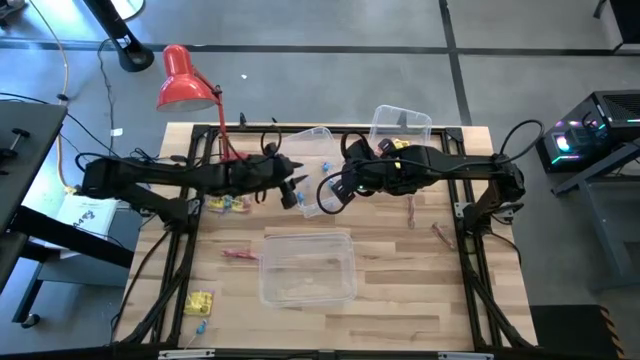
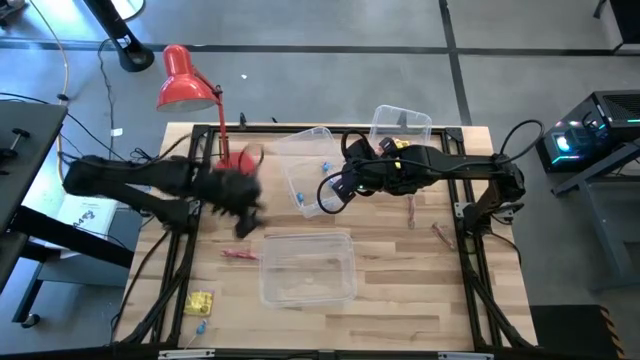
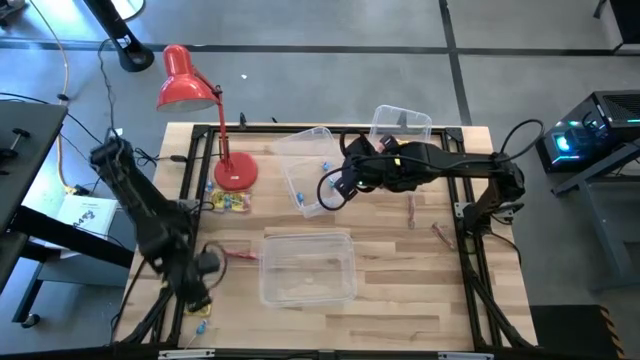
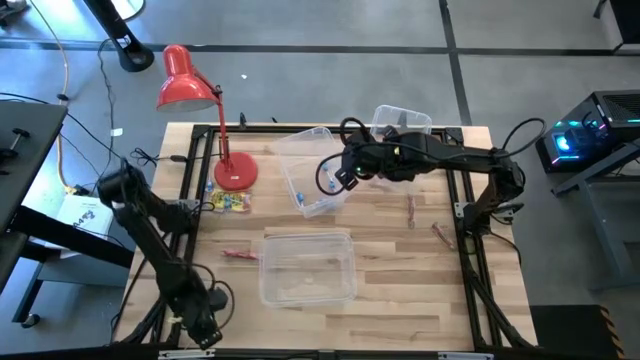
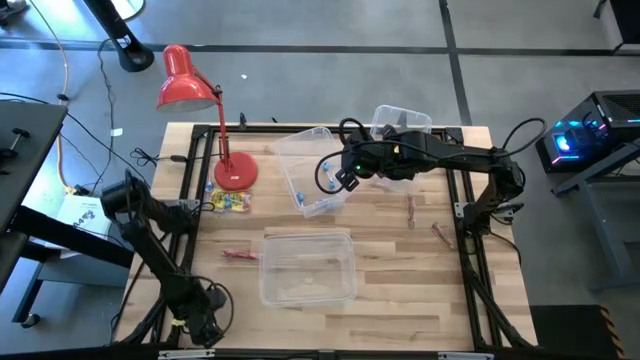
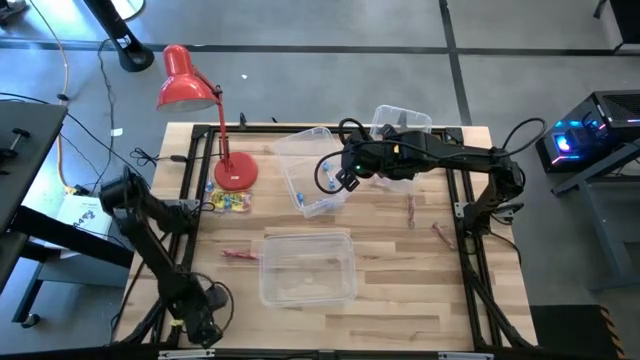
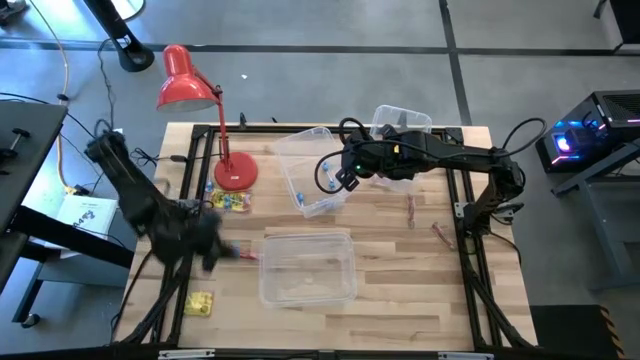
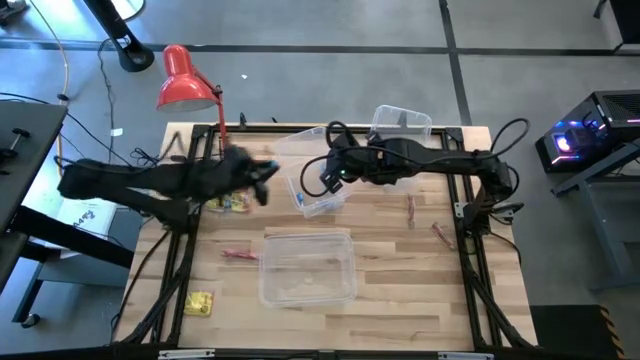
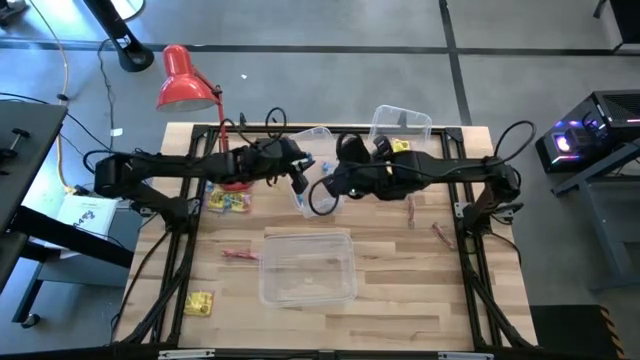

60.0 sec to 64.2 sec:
Task: Sort candy
Put the blue lollipop into the top left transparent bin

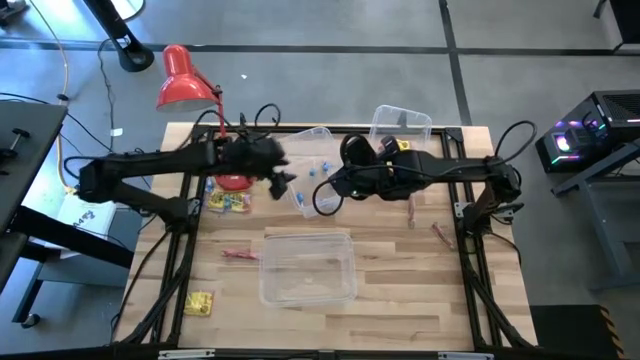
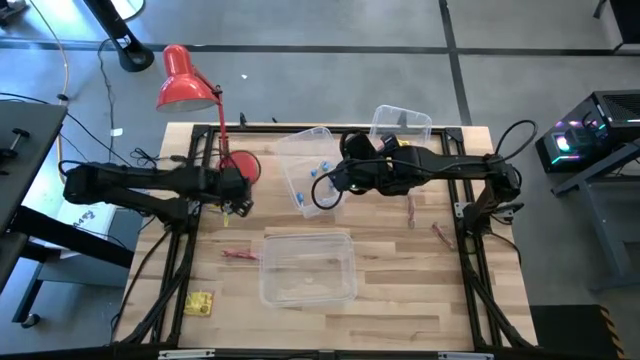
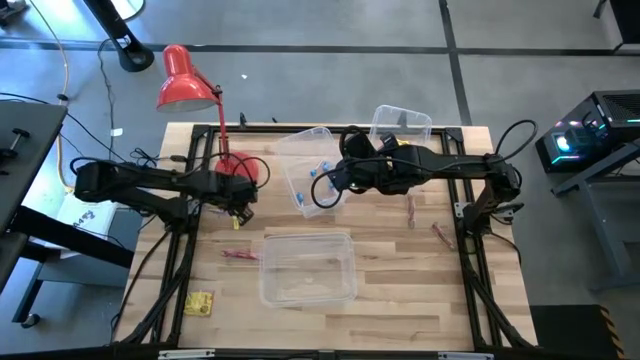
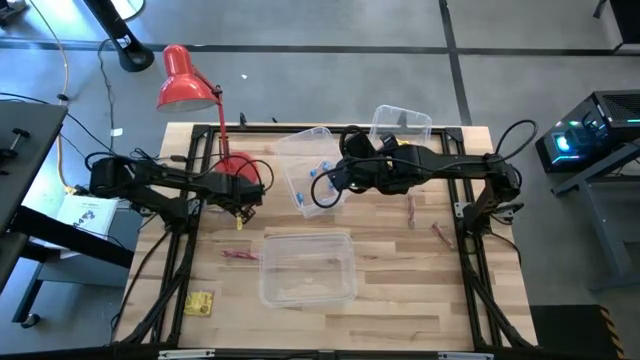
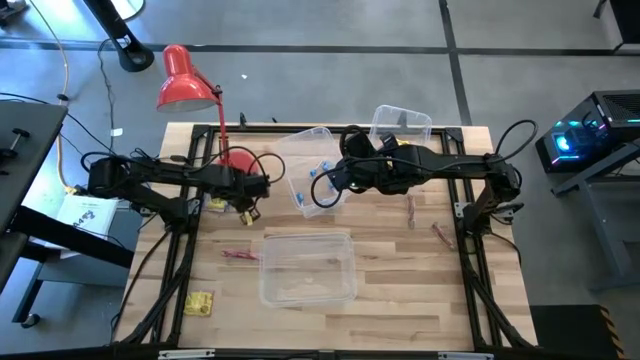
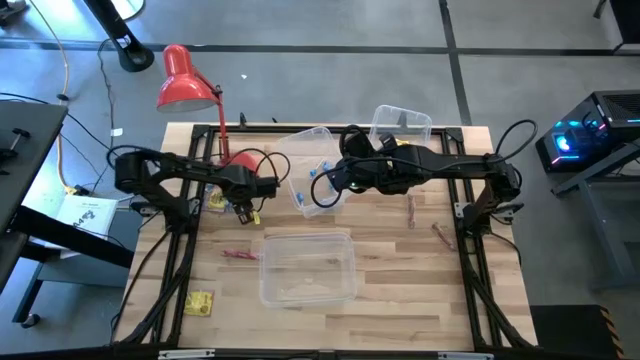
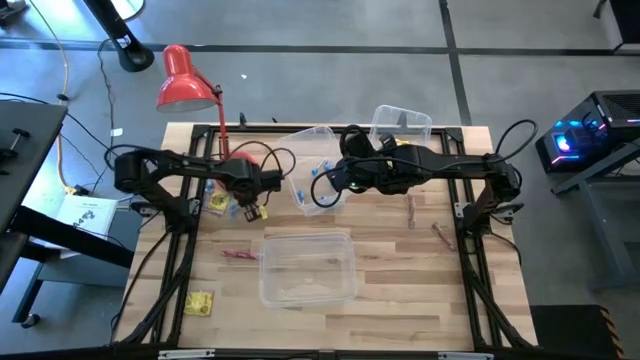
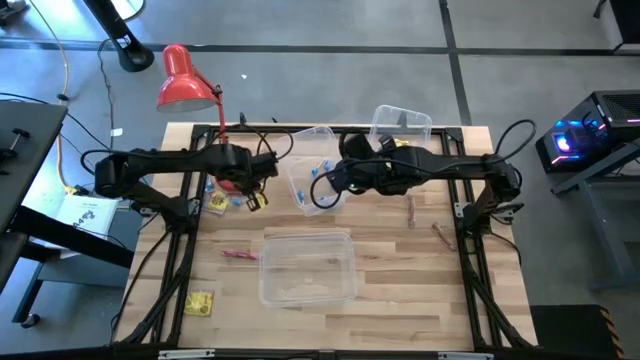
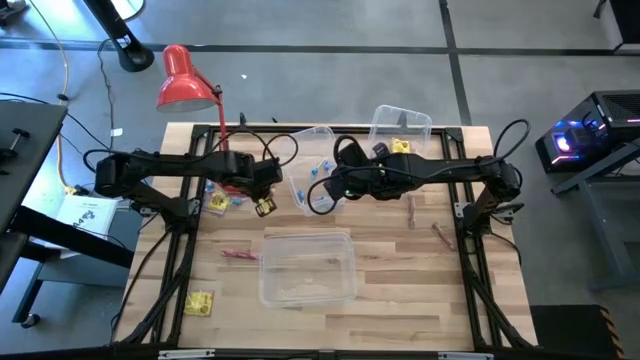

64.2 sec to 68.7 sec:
Put the blue lollipop into the top left transparent bin

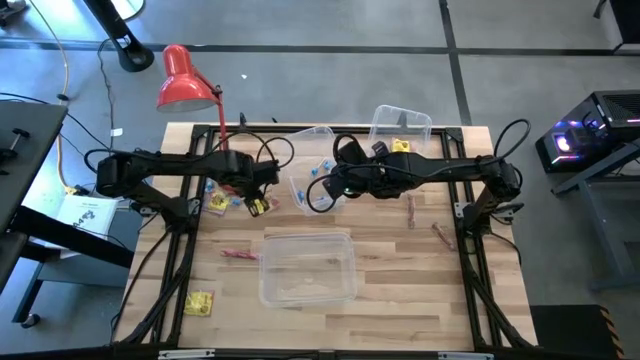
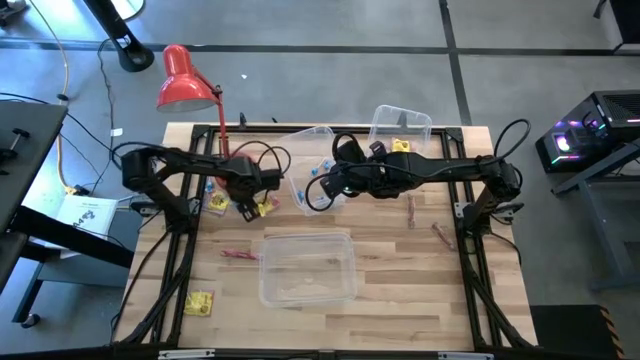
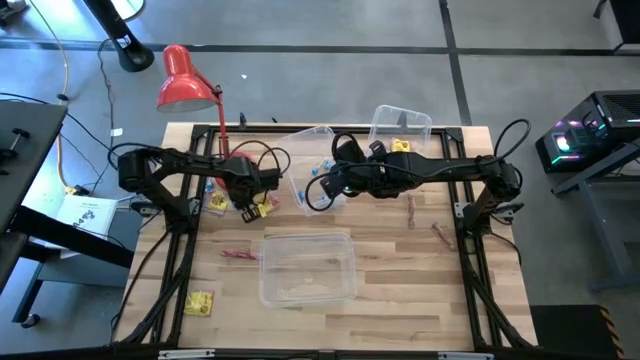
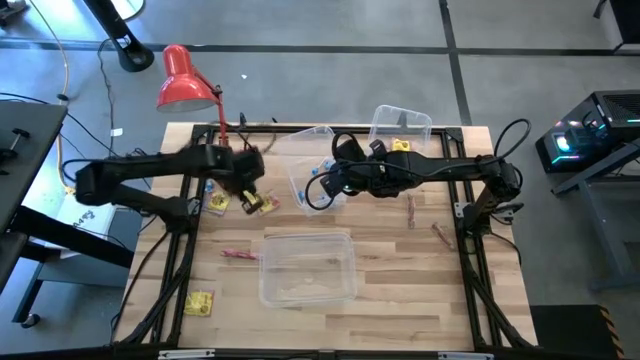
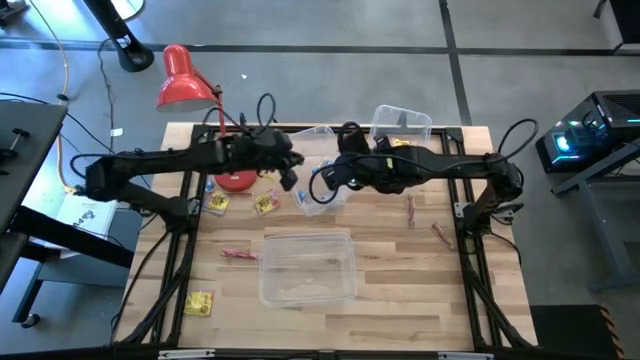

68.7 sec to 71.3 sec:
Put the blue lollipop into the top left transparent bin

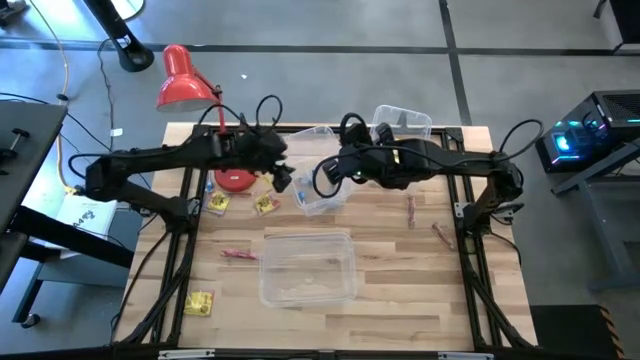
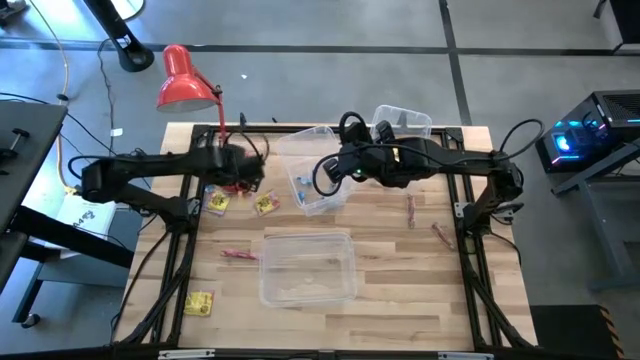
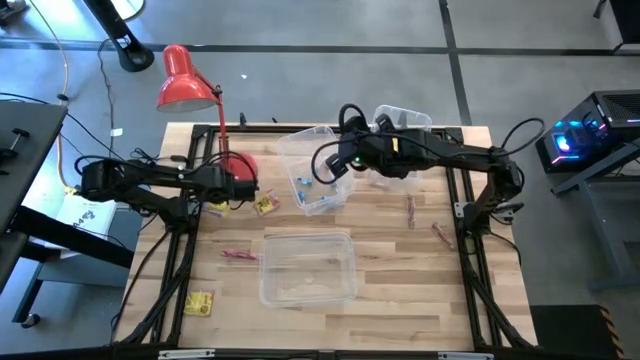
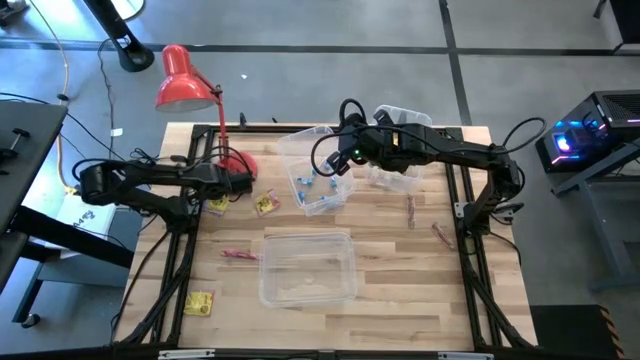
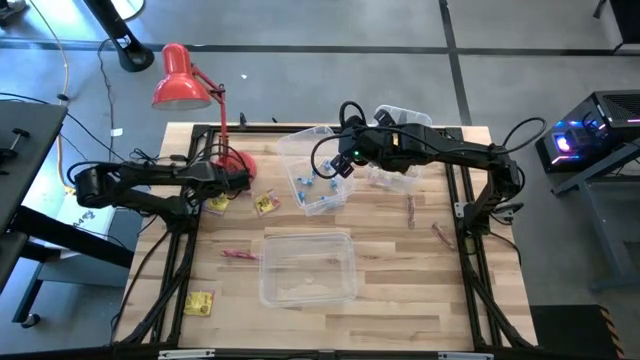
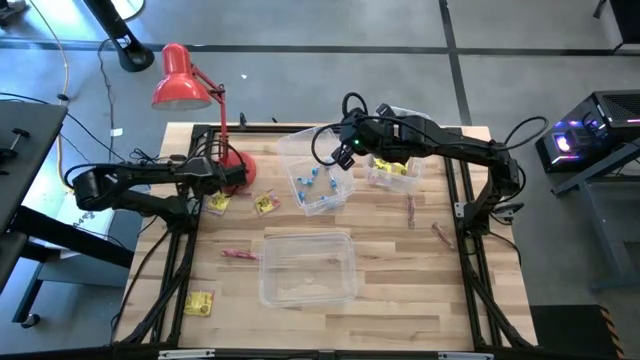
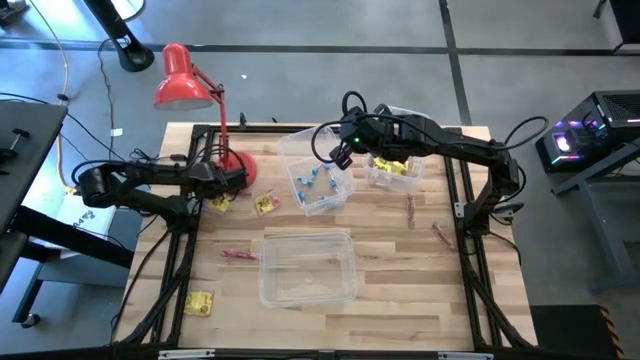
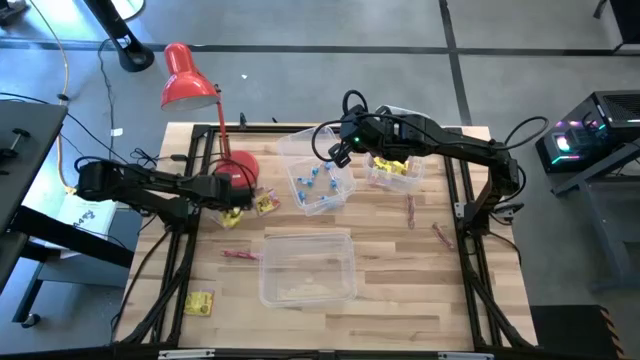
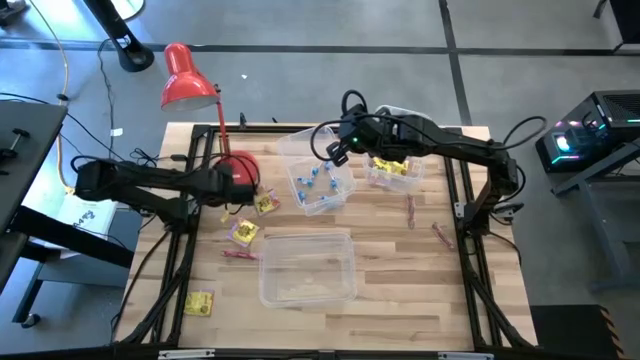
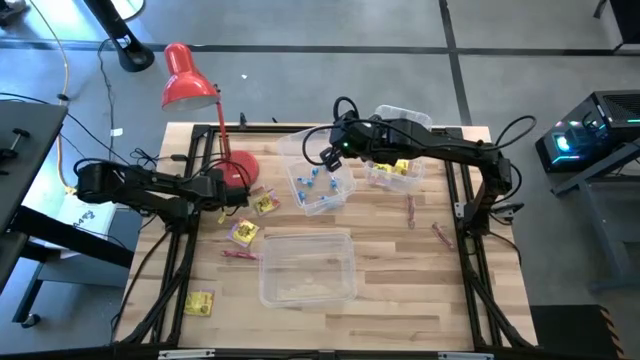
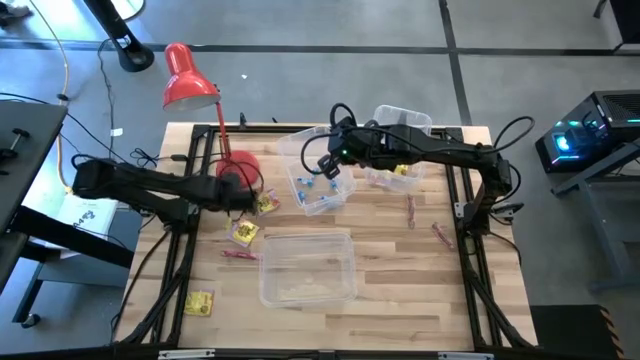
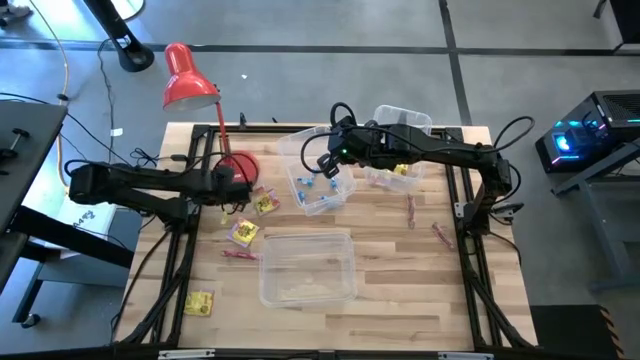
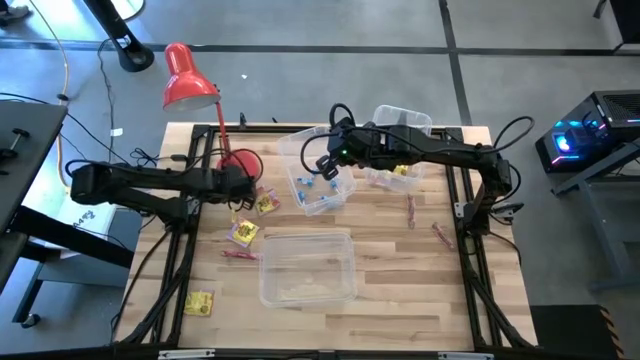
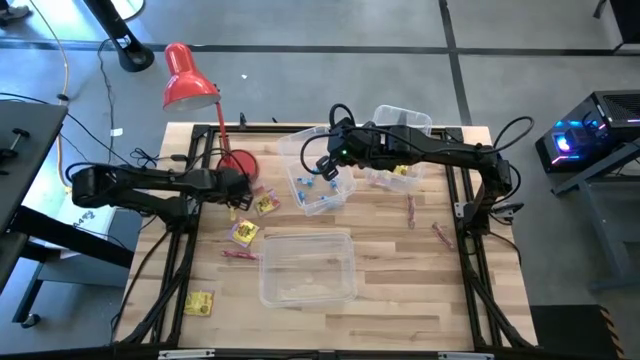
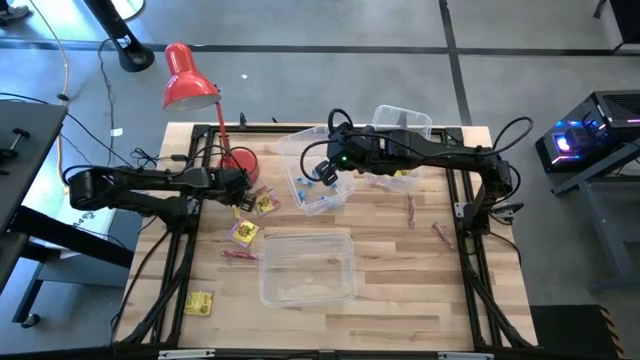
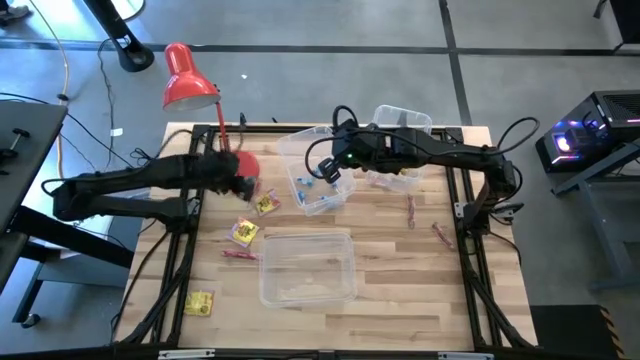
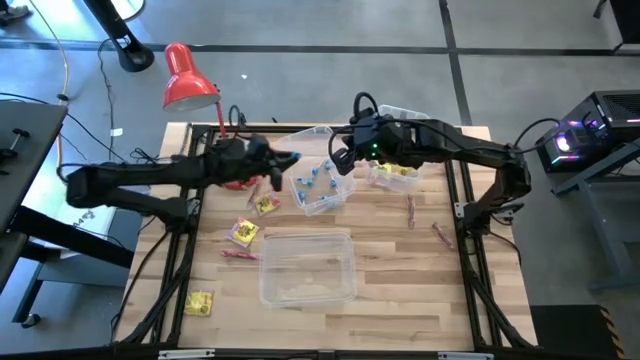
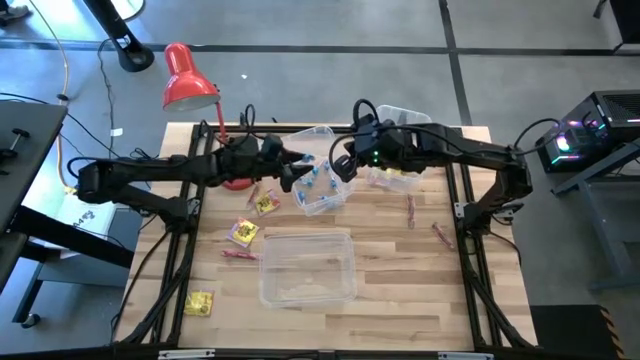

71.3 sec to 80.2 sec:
Put the blue lollipop into the top left transparent bin
